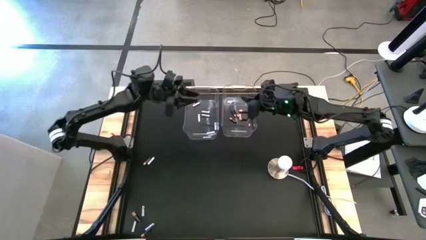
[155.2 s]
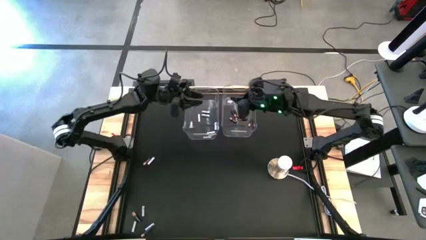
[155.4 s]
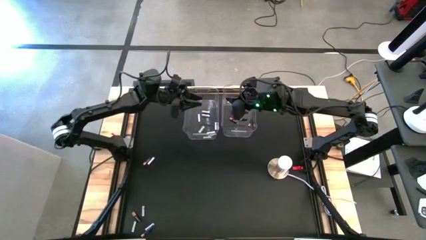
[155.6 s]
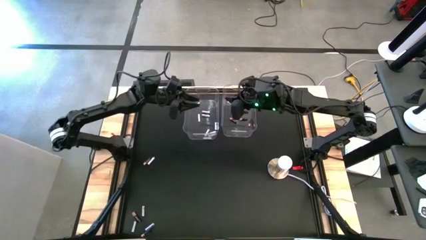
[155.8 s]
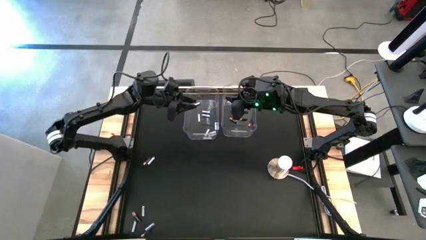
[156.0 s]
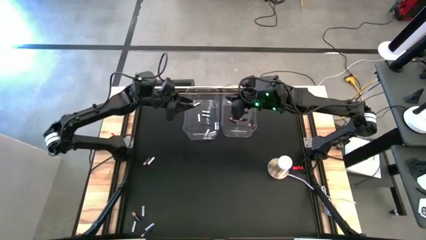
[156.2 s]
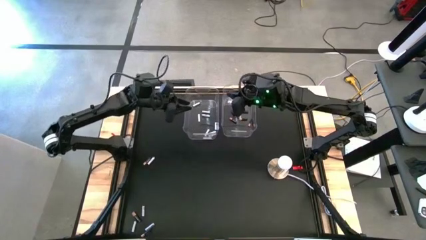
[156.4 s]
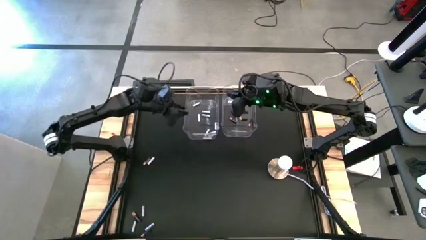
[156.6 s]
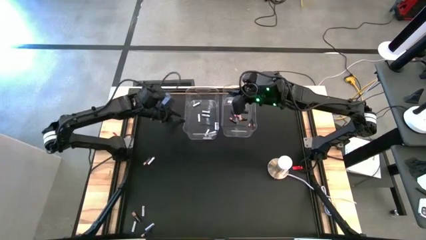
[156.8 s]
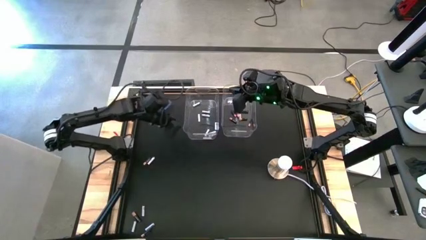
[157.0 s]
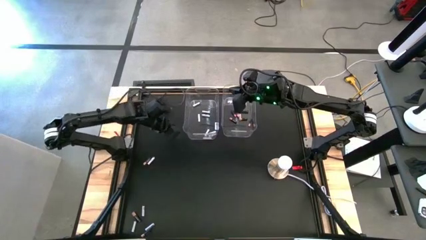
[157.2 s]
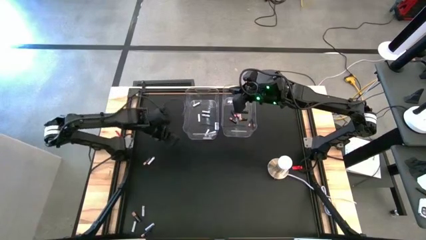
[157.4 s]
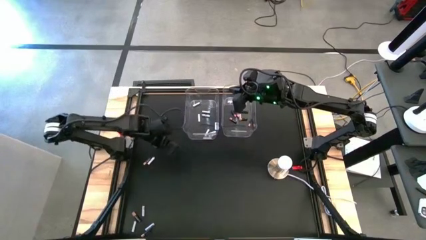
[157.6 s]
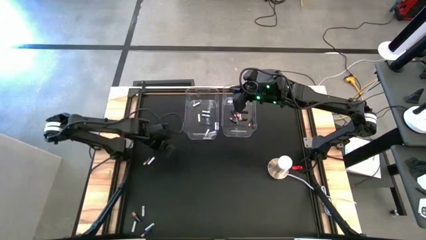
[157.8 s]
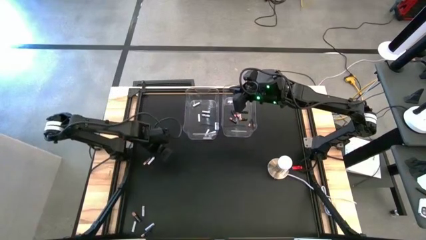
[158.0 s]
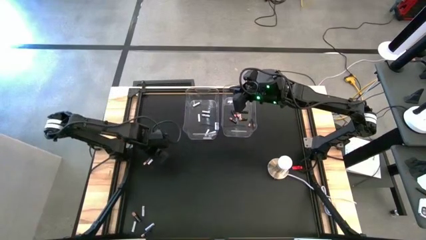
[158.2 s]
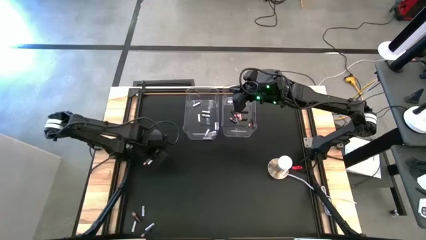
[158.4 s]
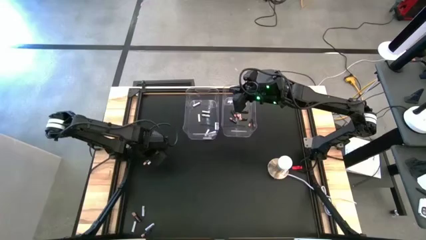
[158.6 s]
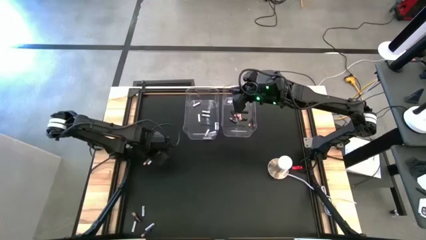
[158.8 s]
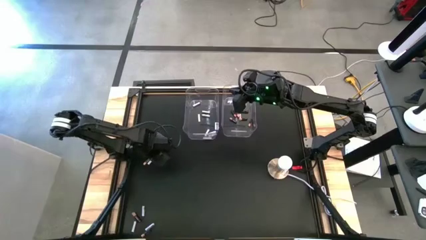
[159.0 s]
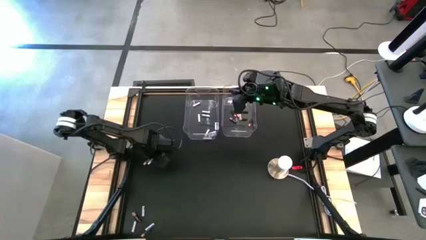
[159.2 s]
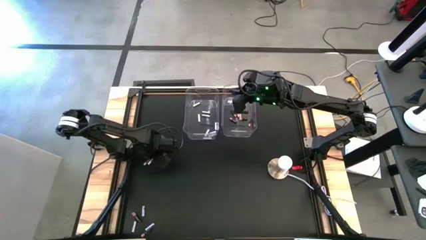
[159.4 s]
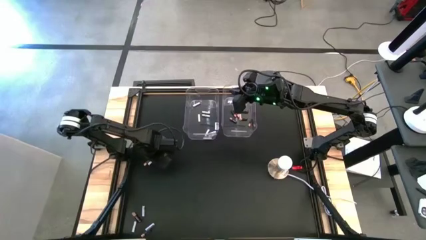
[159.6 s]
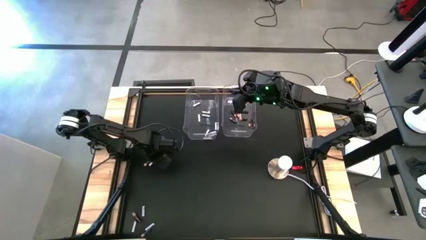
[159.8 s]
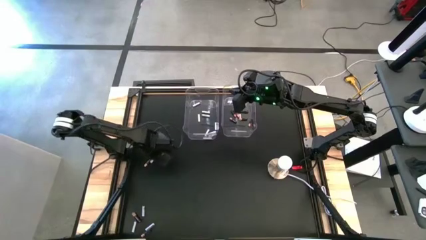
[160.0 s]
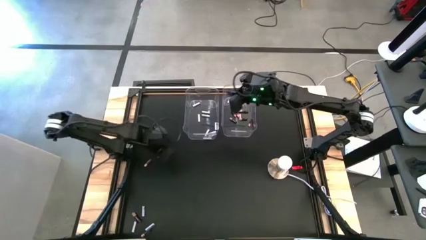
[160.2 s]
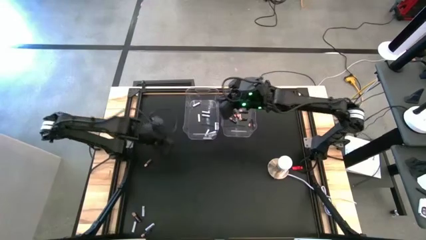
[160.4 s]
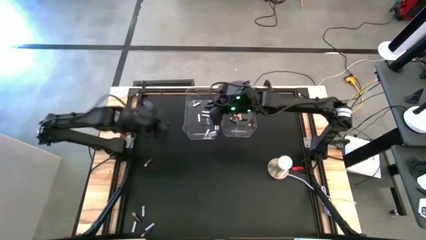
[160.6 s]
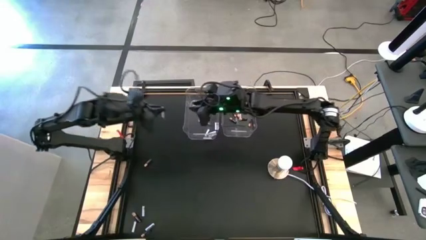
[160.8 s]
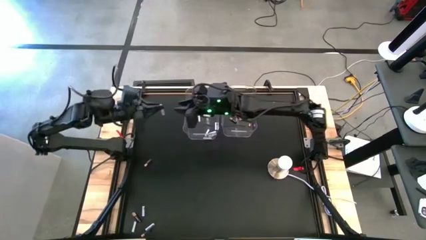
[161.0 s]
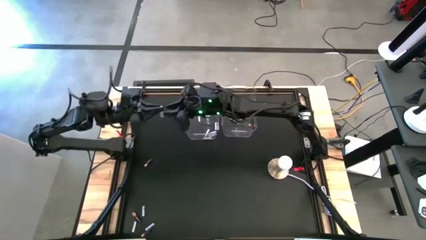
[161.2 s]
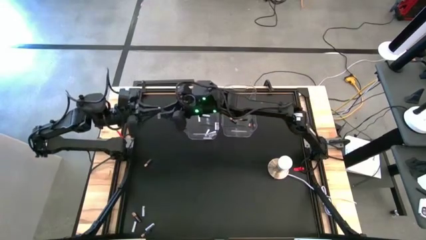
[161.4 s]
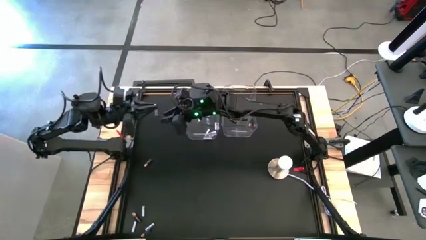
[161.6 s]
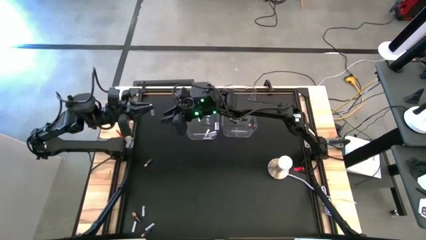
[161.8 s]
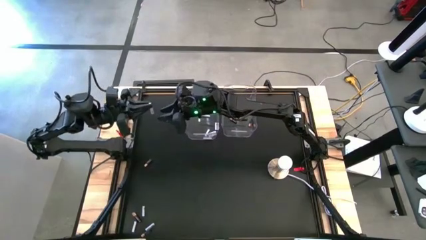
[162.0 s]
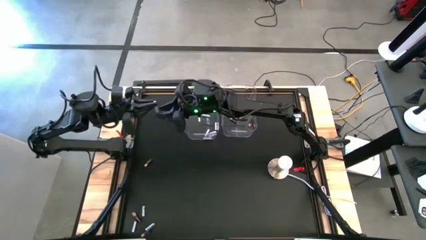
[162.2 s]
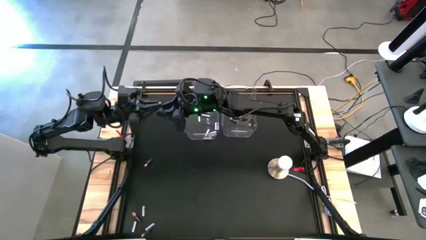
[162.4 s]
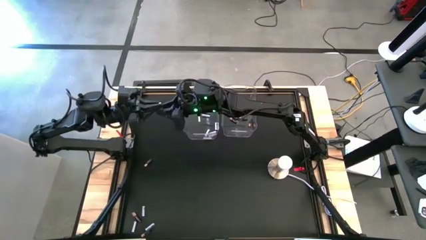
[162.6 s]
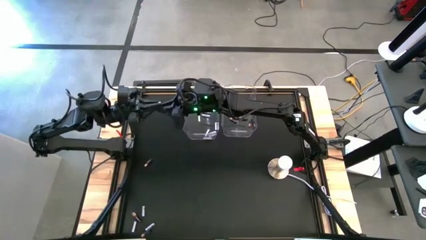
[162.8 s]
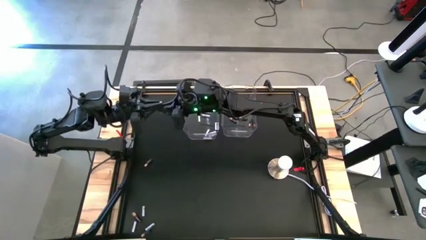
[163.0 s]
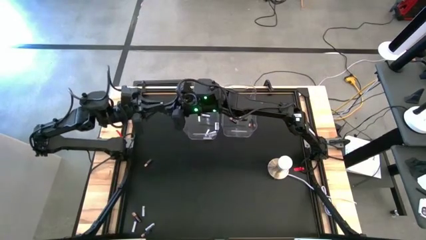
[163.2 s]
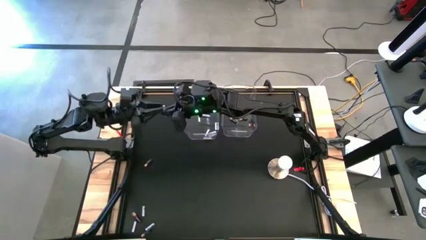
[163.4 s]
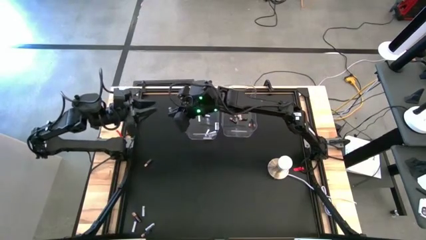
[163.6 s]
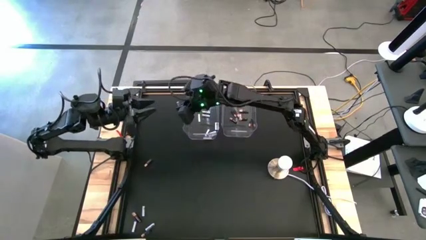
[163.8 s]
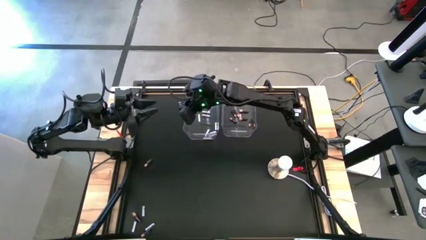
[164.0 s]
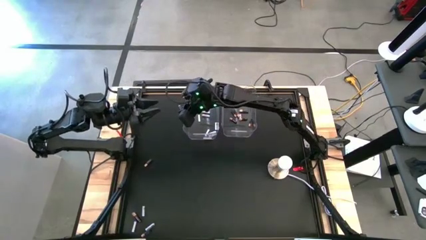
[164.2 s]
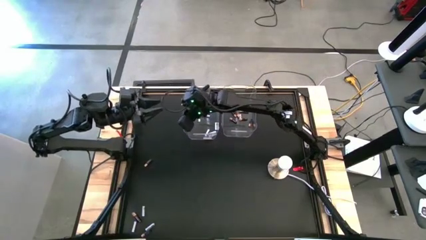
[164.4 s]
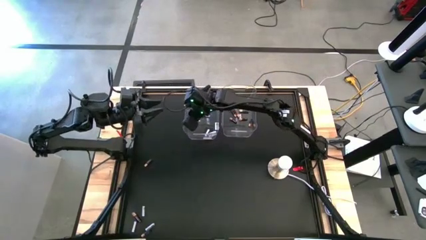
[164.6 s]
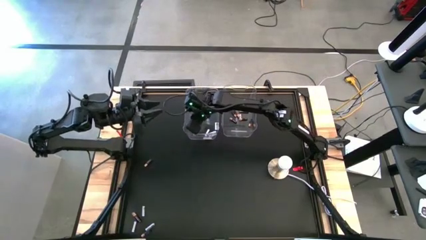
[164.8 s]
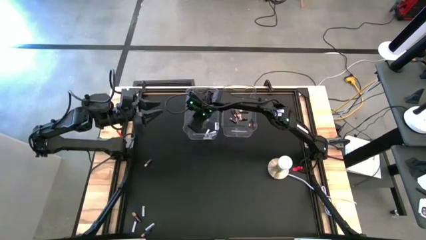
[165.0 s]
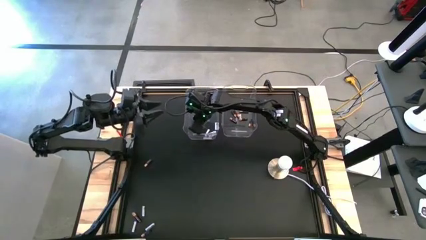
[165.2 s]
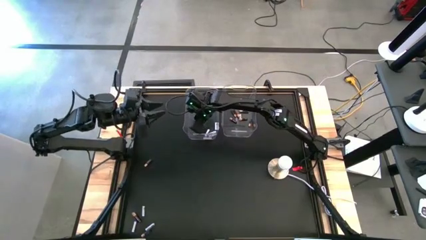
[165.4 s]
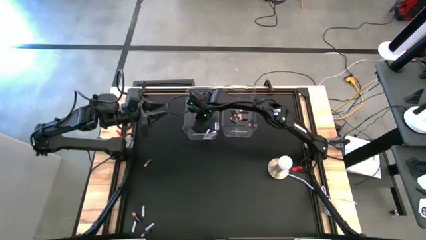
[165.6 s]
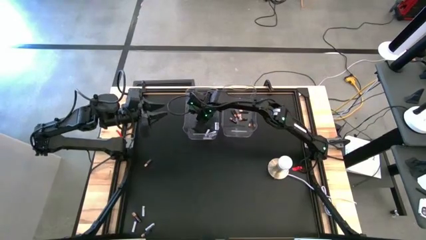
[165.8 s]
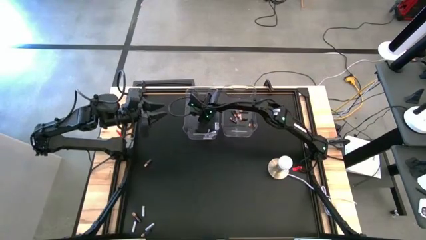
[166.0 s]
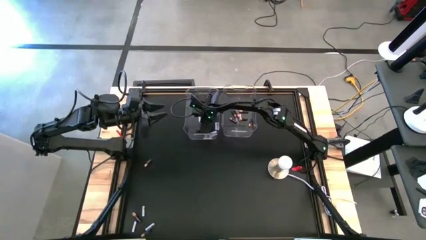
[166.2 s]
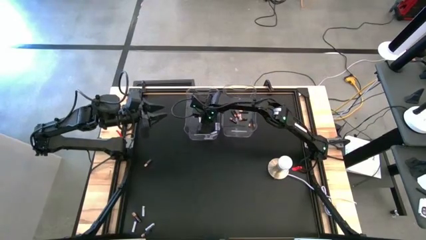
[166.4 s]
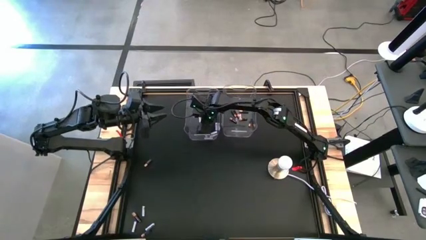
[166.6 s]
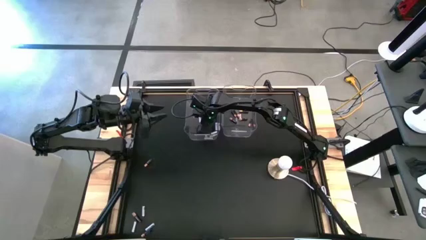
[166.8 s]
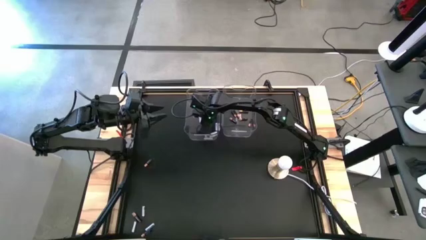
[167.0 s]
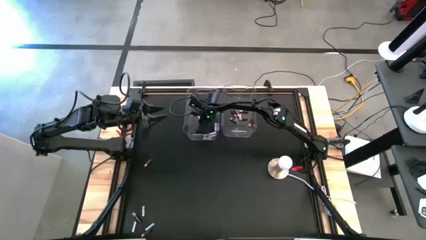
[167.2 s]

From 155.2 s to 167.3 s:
Task: Sort batteries
Put the white battery into the left transparent bin

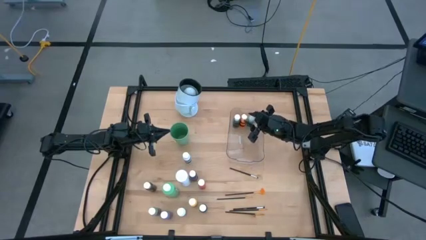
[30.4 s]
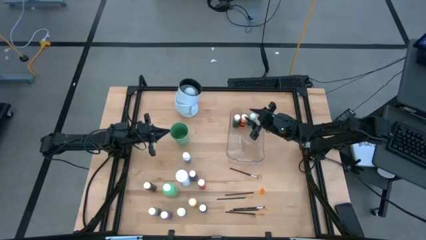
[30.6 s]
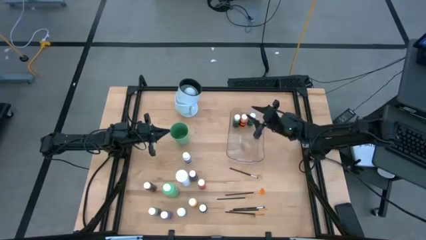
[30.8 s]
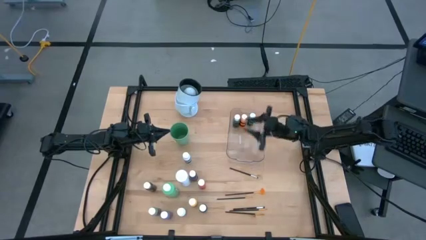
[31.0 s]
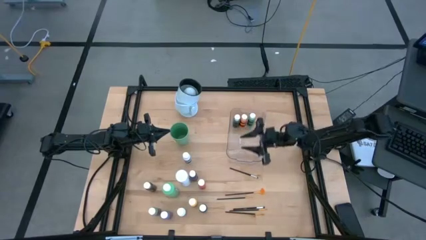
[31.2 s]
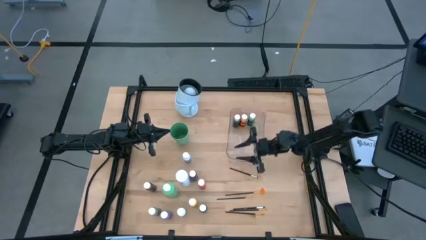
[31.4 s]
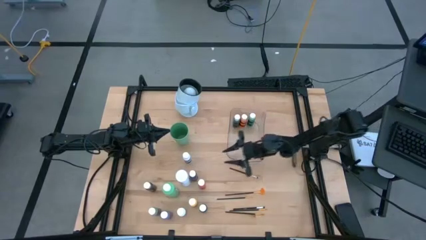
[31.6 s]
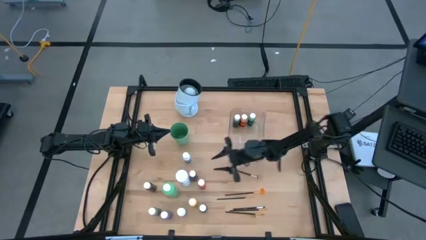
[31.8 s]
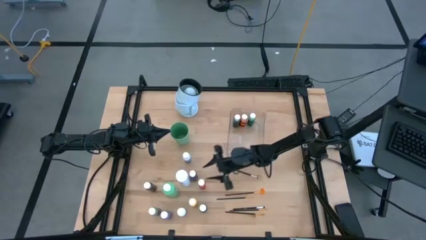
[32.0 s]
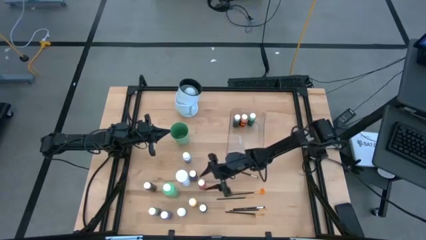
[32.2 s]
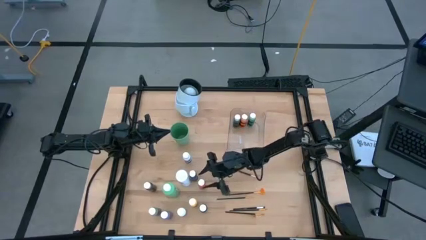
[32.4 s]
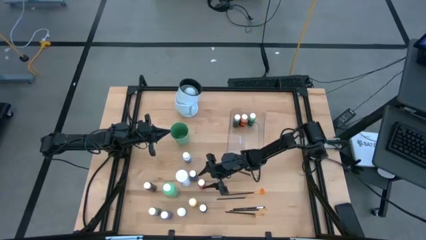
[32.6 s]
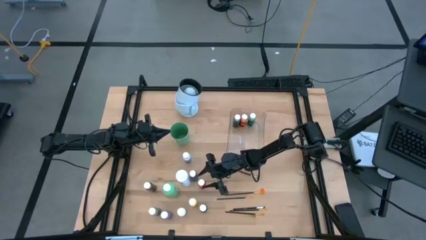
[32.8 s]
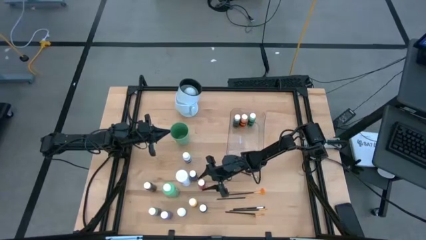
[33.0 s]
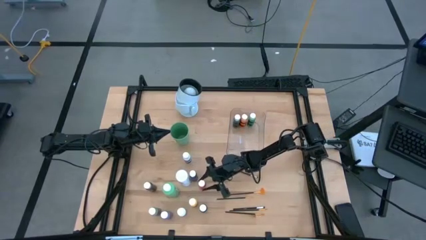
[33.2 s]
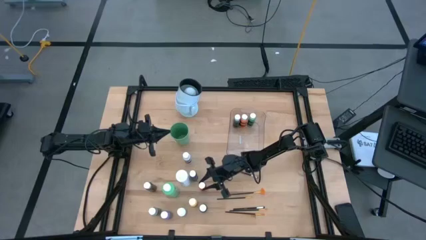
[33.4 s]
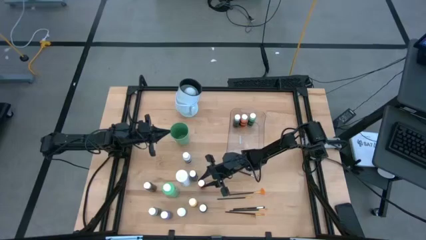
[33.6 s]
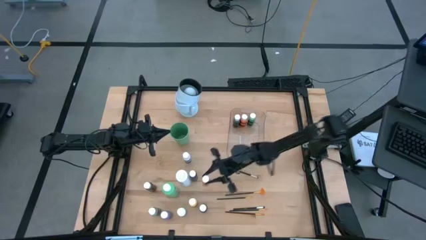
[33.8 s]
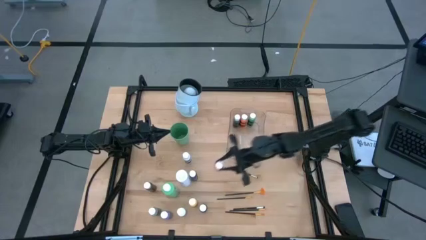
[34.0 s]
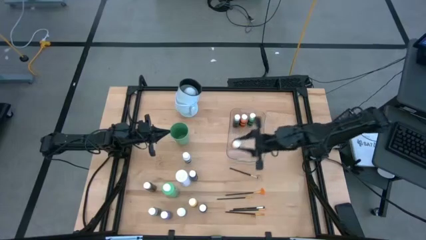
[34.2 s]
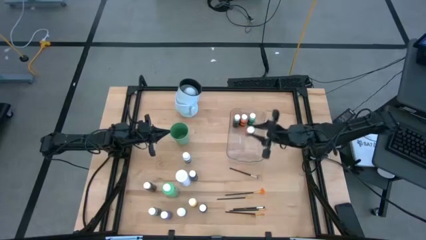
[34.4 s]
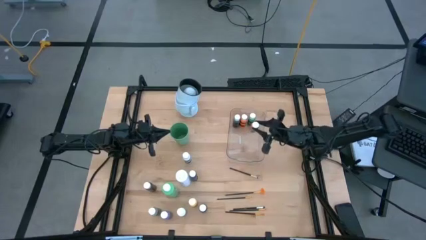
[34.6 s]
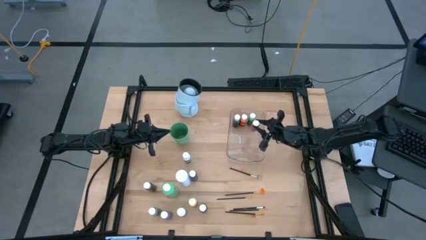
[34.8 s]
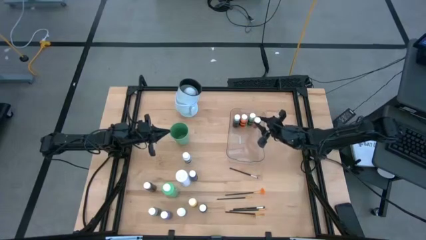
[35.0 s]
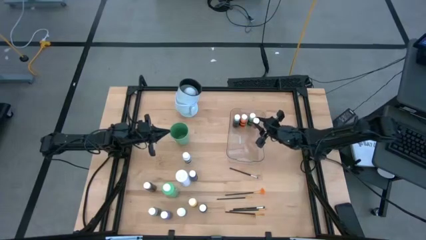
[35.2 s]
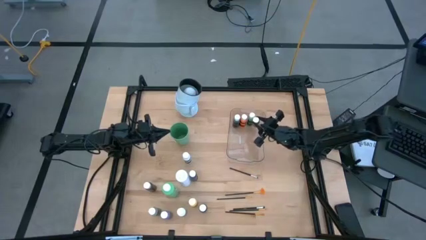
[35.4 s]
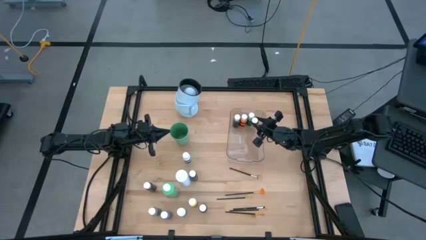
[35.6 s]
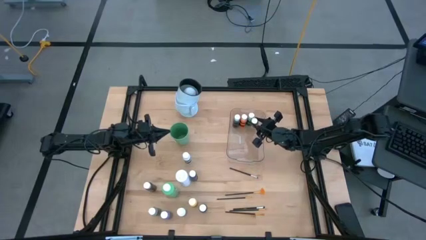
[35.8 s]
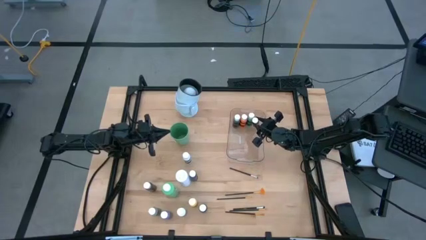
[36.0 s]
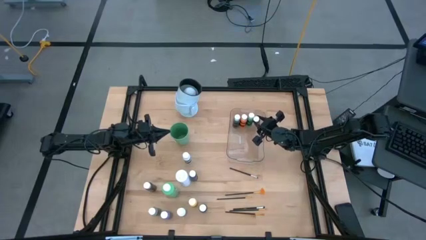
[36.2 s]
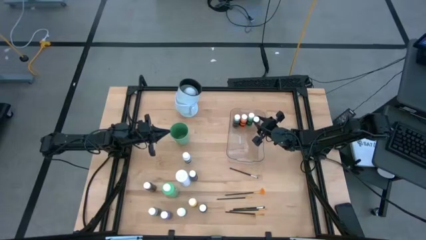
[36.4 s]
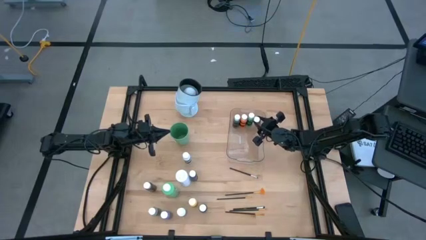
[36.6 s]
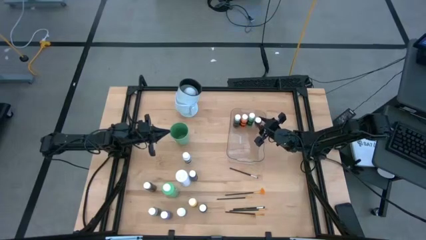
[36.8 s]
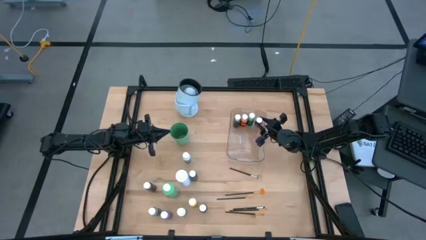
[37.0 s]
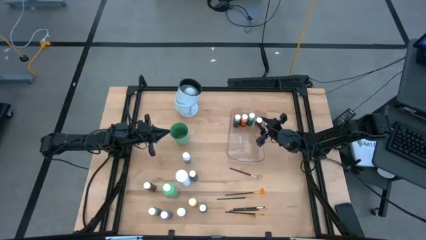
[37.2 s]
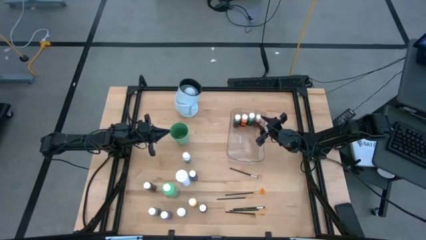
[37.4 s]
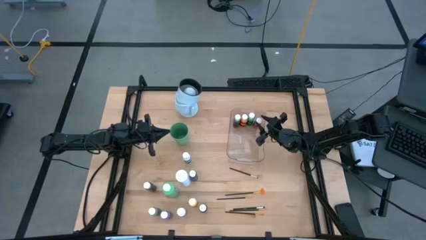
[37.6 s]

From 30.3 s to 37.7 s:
Task: Pick & Place Paint Supplies
Put the red paint bottle into the transparent bin
